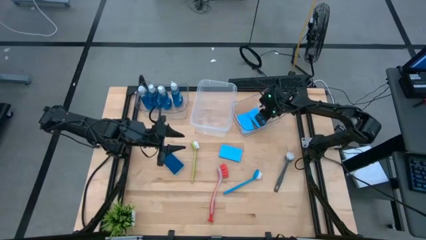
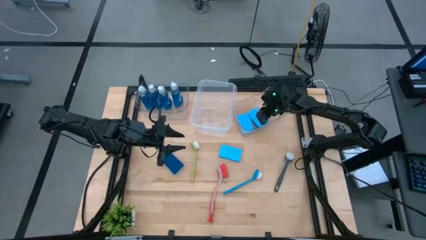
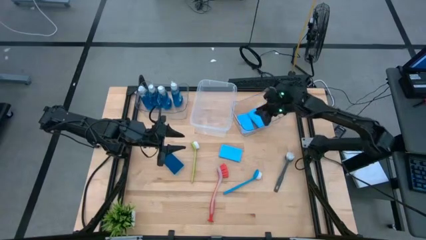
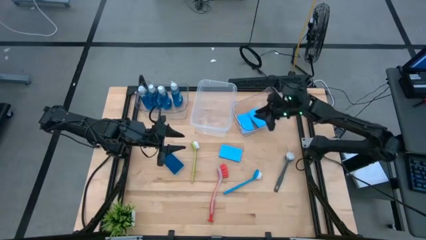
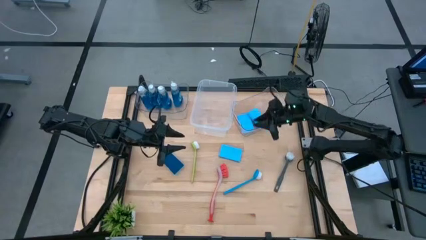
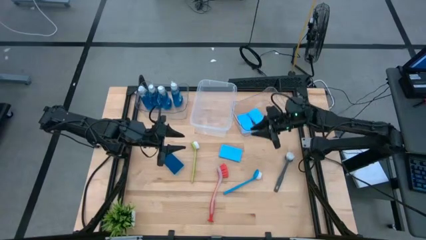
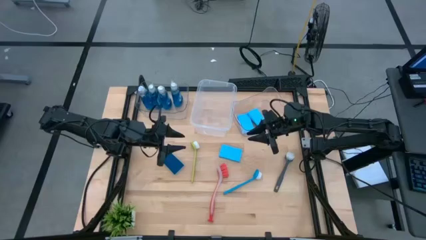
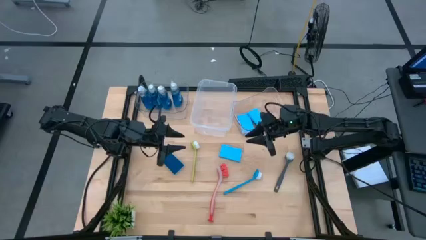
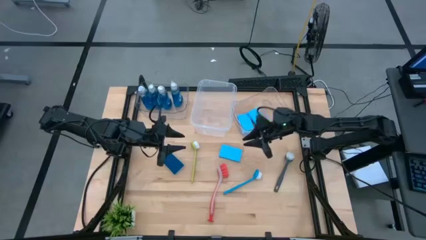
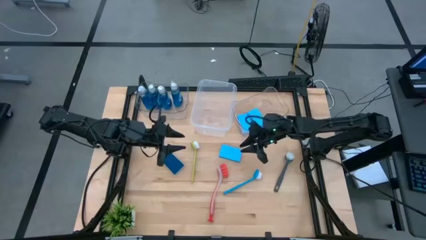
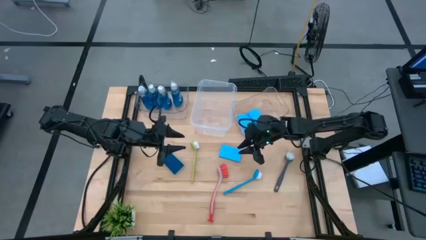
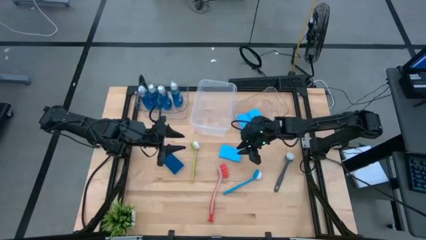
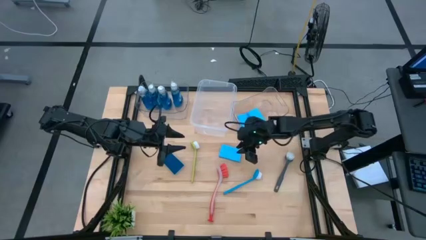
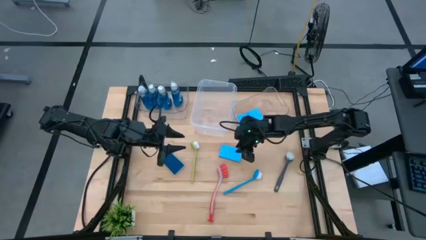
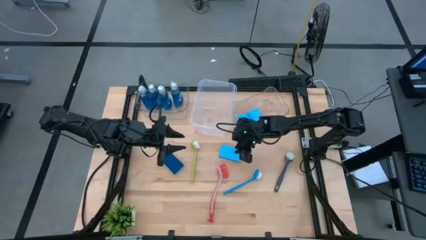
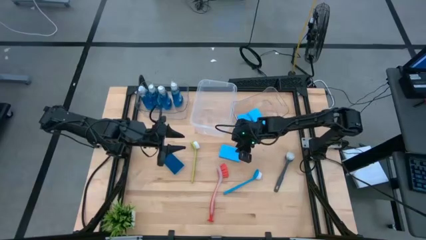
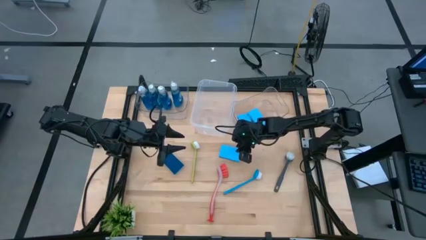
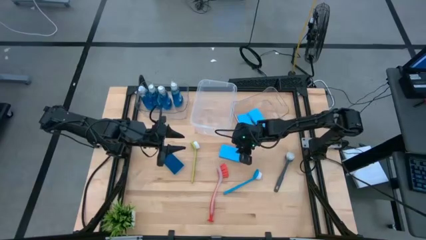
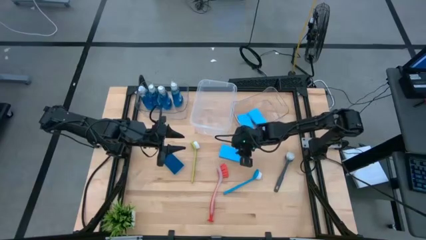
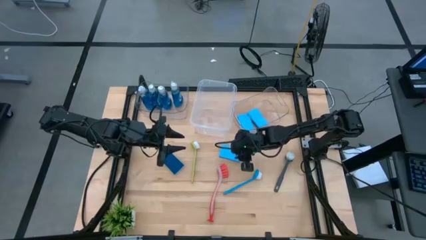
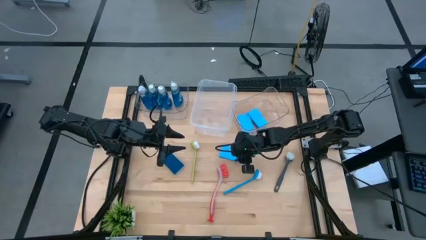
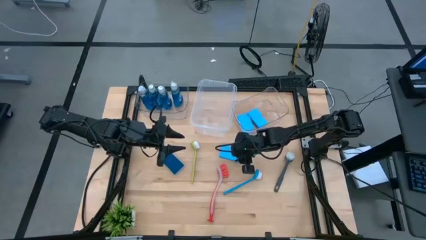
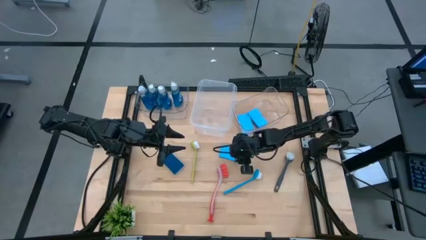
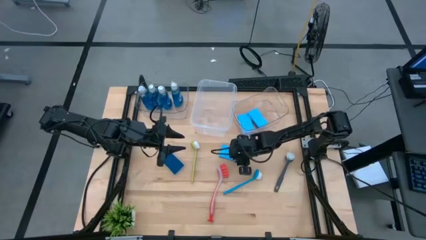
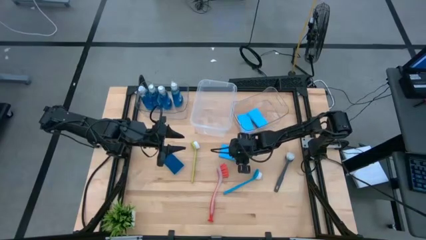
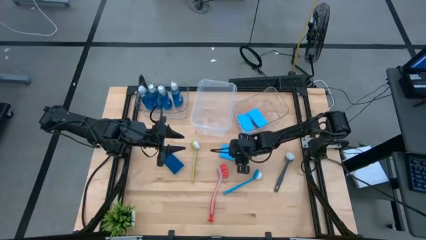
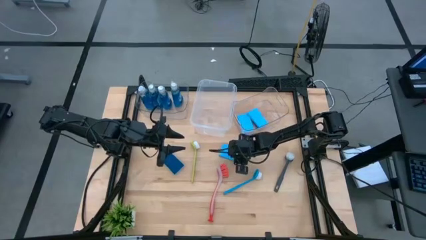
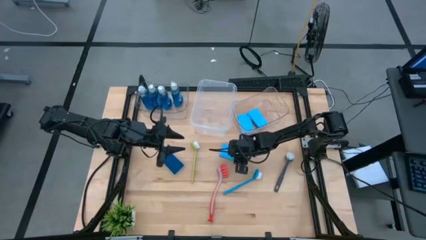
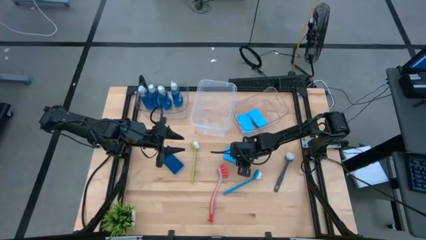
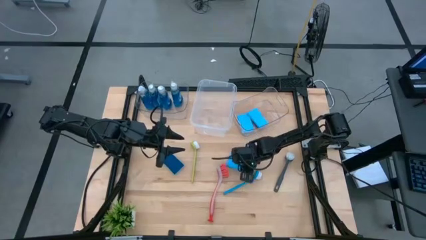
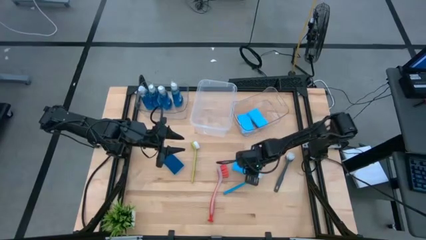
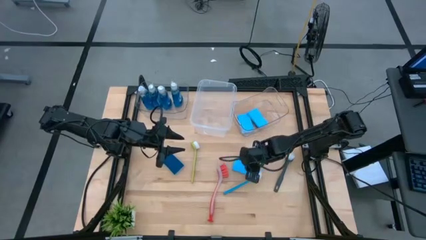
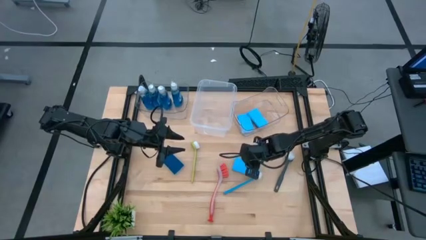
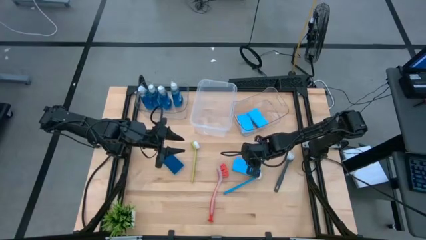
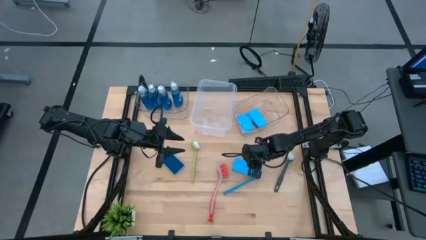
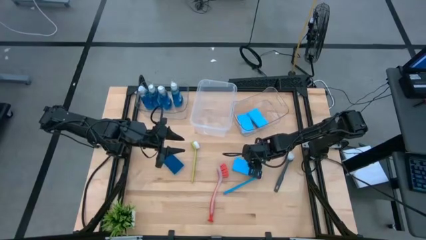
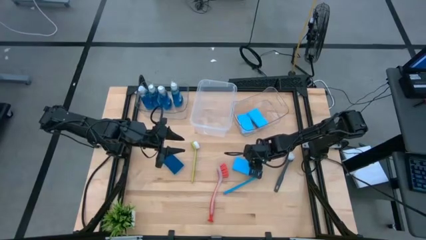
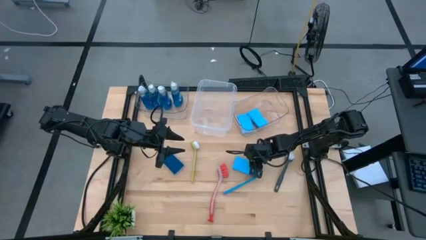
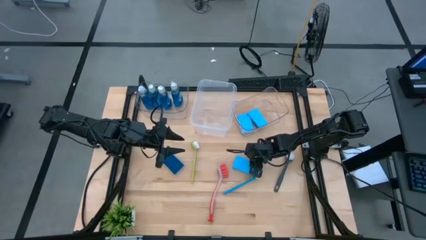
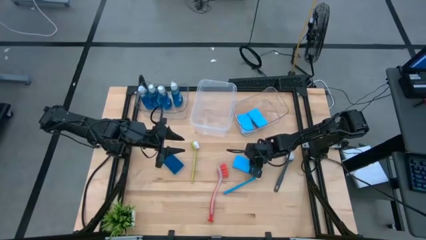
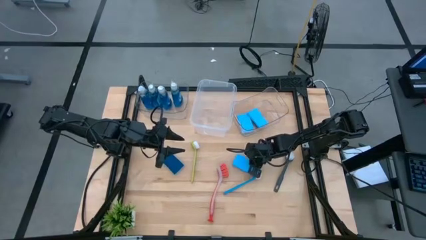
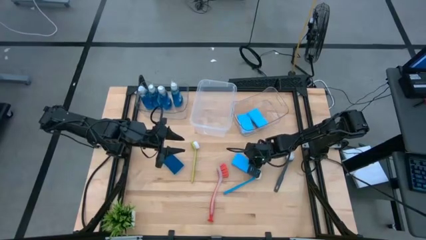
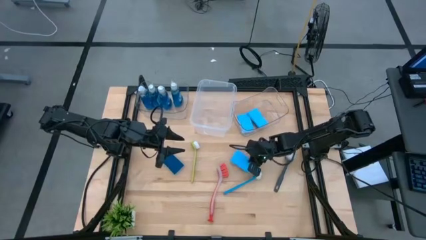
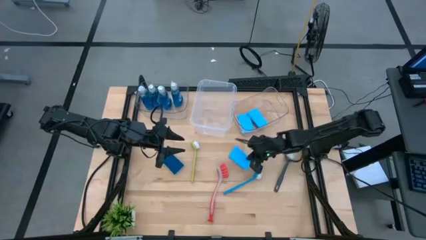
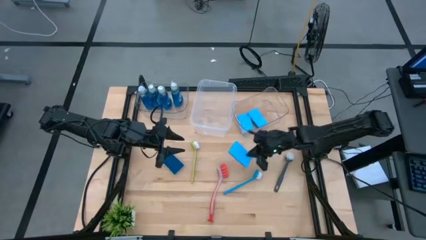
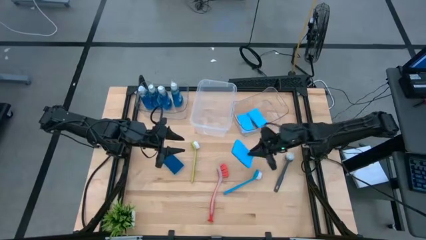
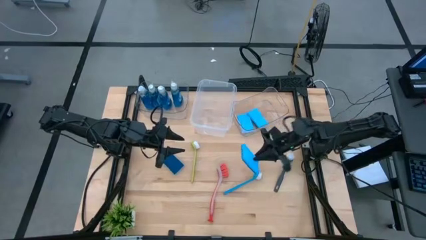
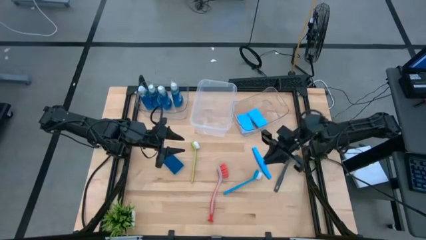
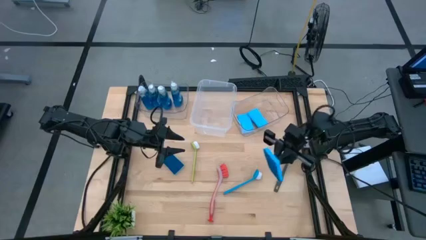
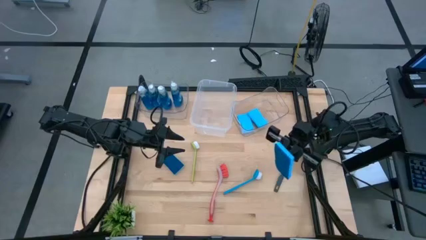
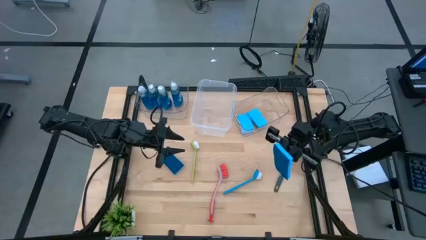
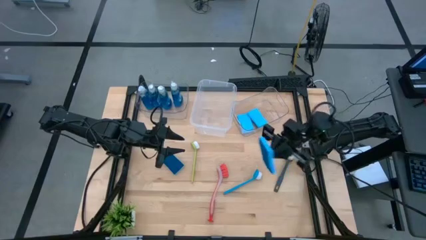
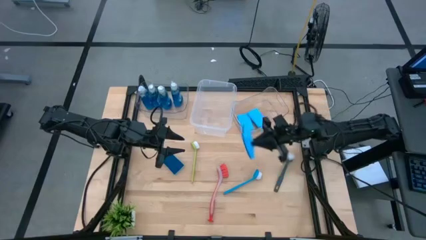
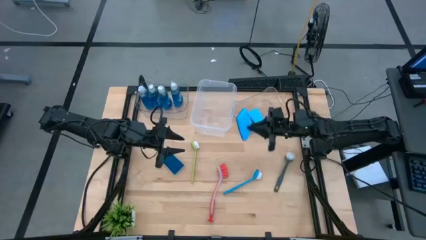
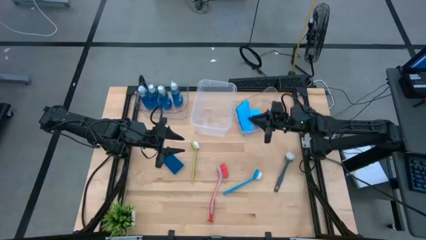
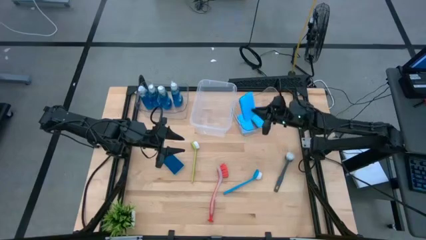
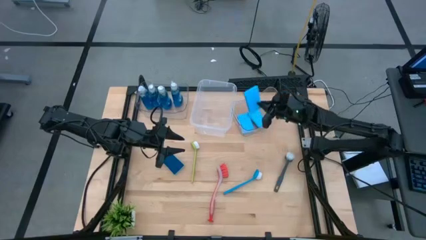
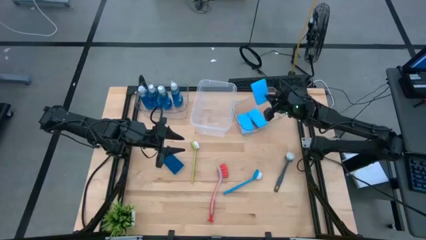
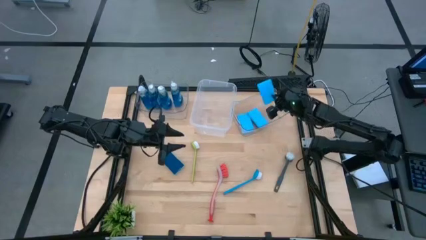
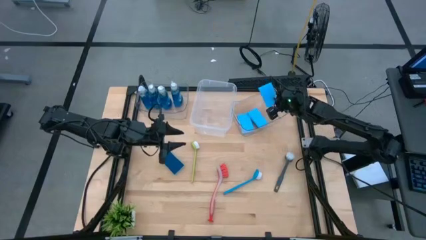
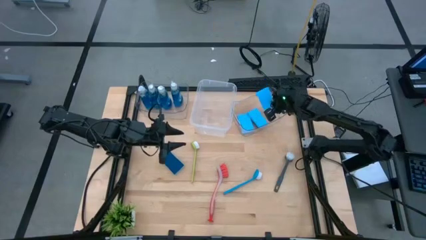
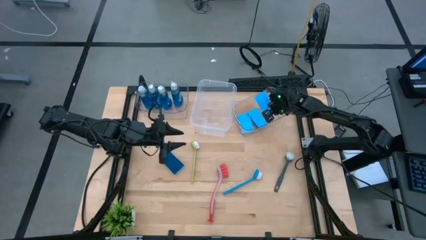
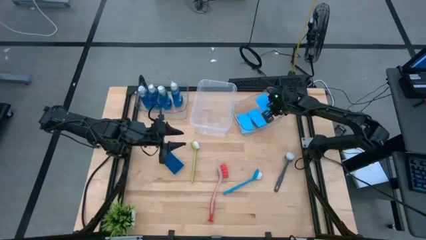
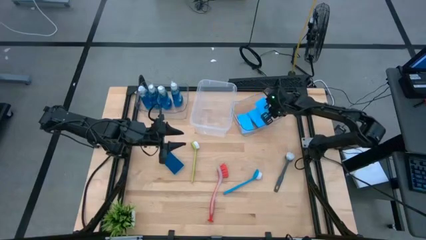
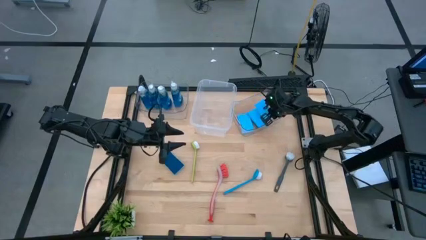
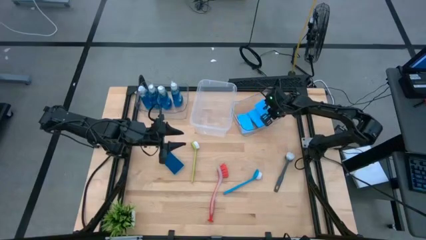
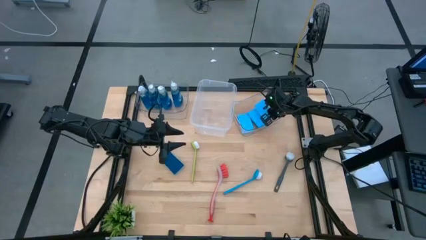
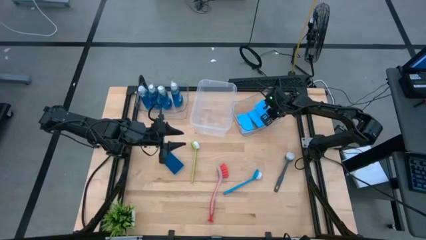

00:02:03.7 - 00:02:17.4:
Task: Pick & Place Kitchen Sink Supplies
Put the sponge into the right transparent bin

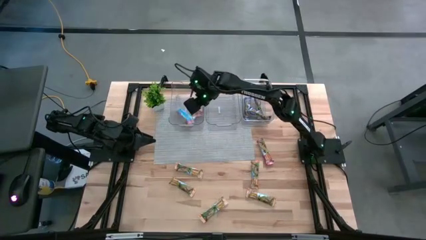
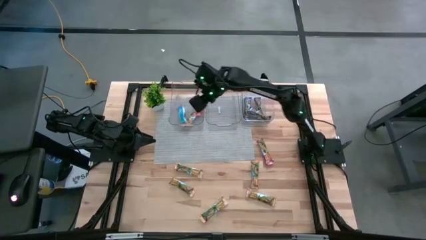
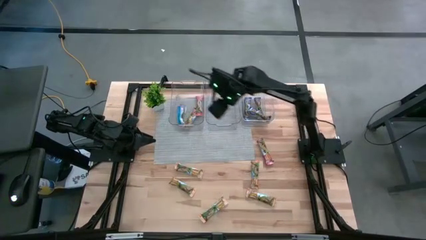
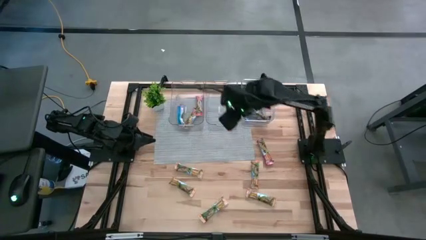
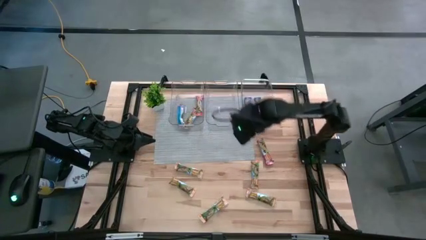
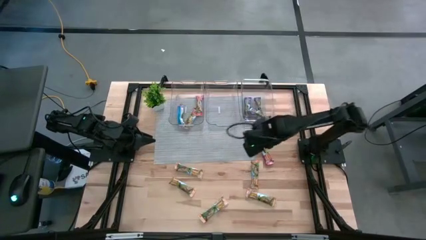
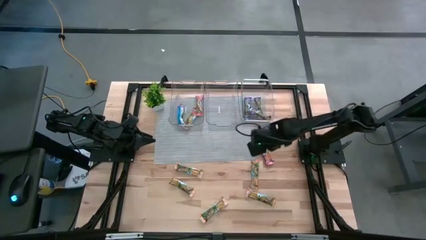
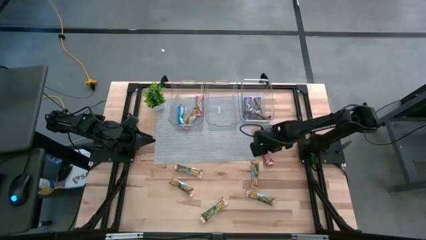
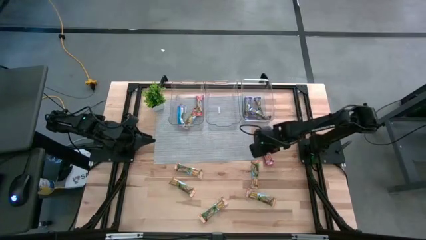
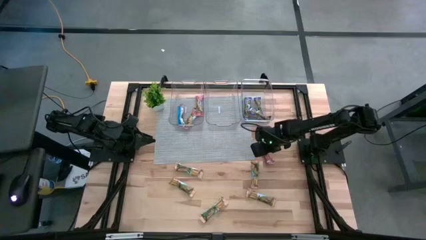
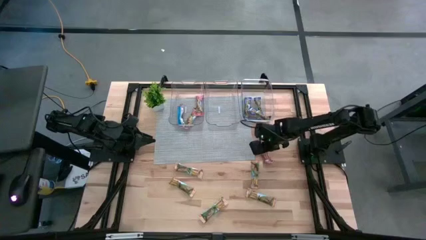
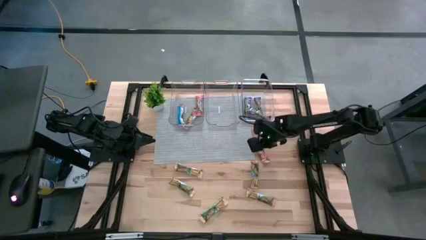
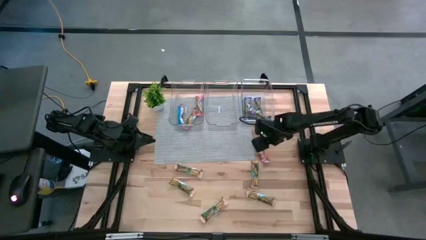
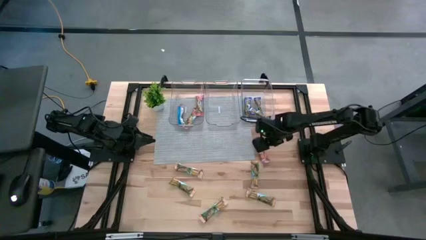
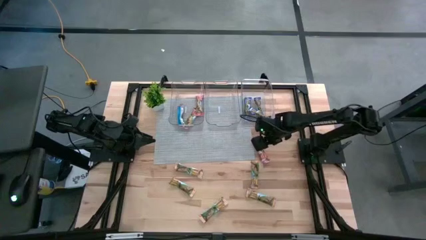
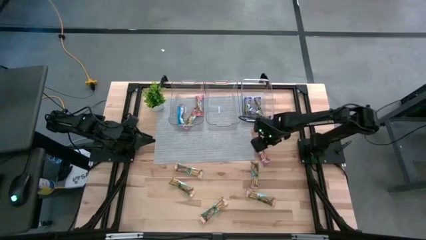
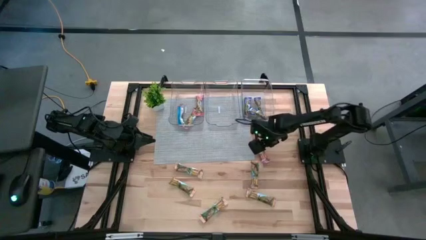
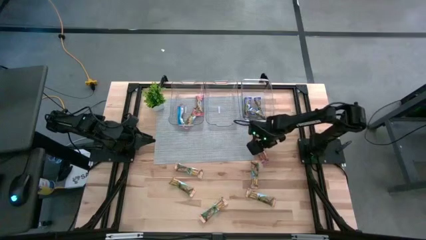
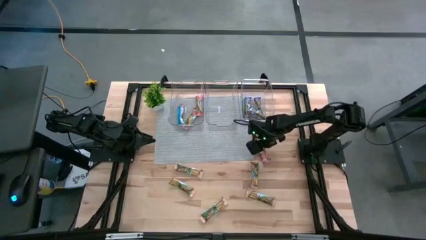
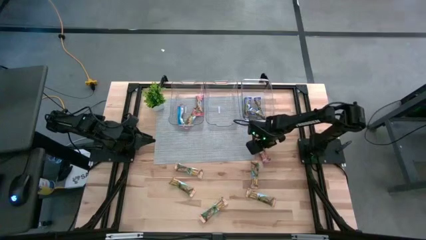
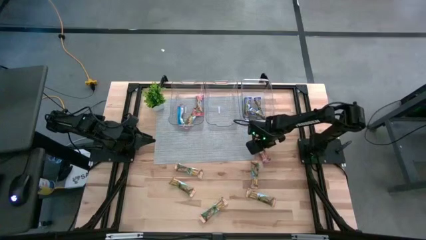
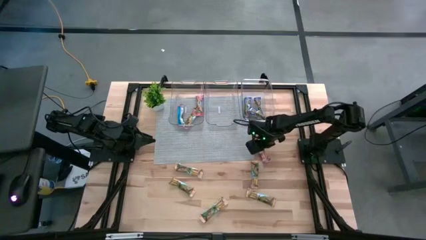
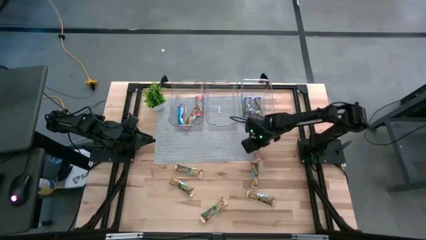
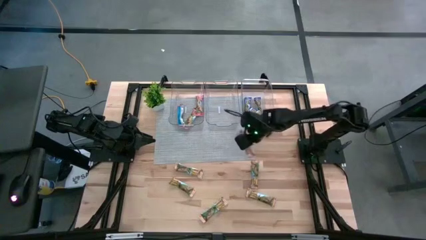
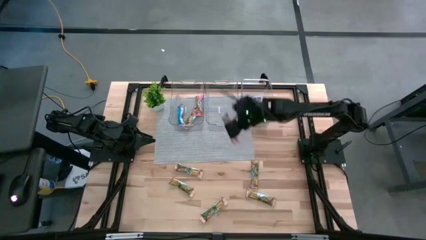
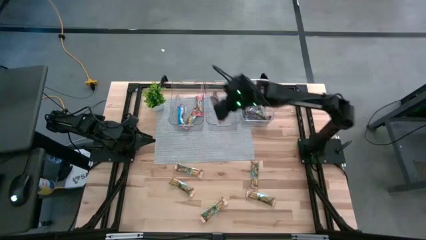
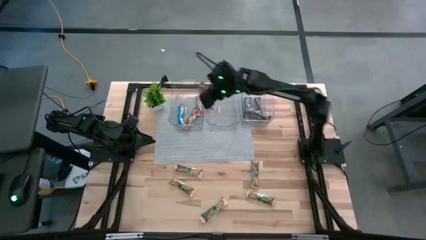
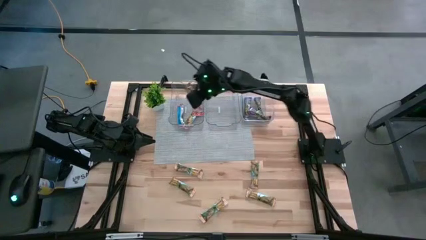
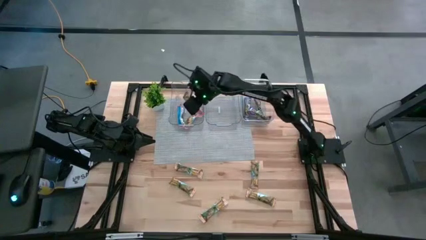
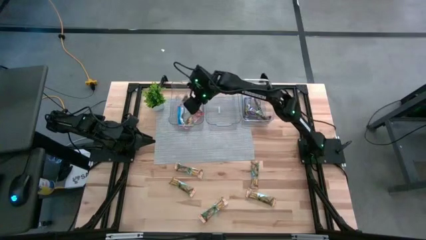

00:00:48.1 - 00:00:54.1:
Task: Pick and place Granola Bars by type
Put the red granola bar into the left transparent bin
